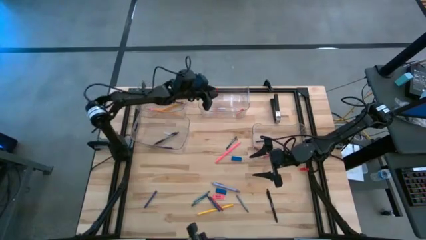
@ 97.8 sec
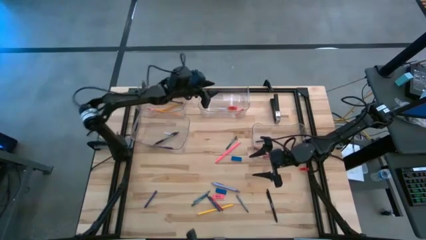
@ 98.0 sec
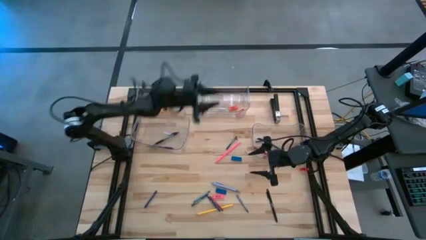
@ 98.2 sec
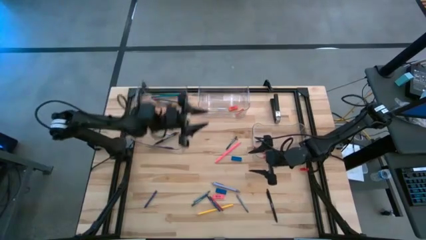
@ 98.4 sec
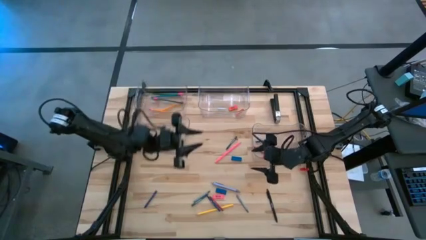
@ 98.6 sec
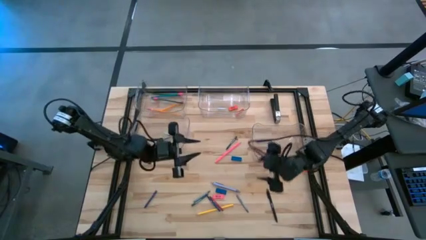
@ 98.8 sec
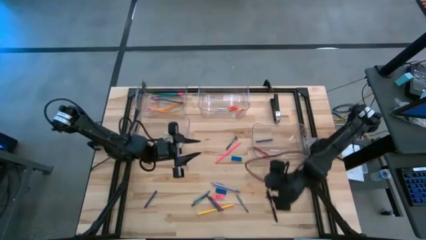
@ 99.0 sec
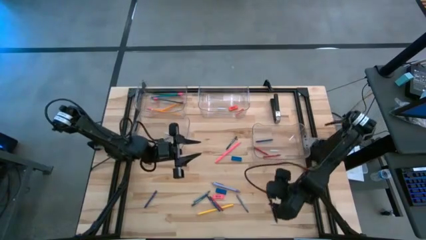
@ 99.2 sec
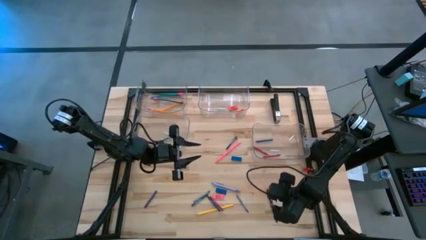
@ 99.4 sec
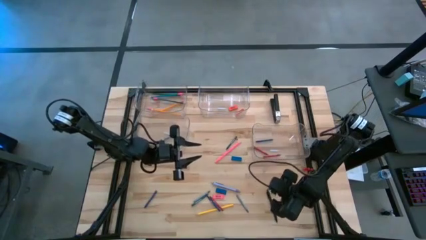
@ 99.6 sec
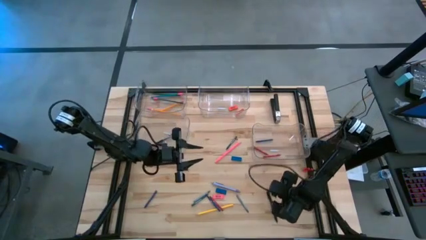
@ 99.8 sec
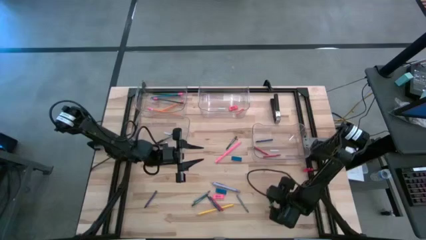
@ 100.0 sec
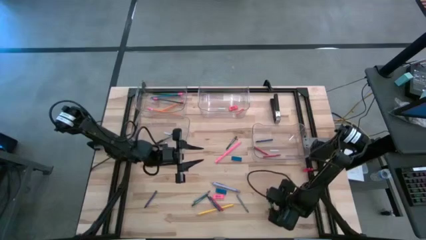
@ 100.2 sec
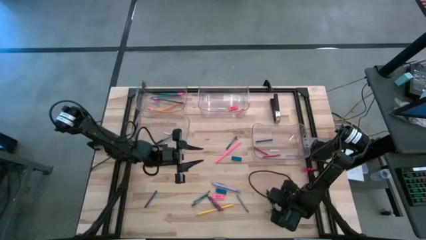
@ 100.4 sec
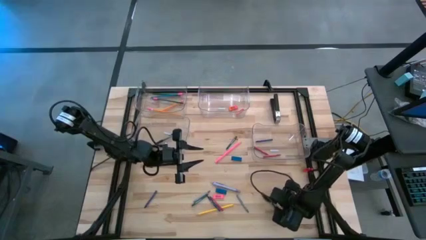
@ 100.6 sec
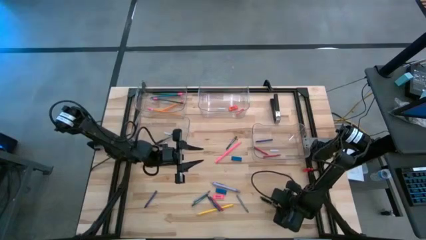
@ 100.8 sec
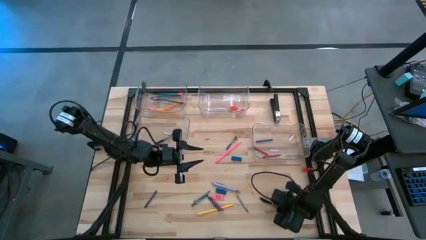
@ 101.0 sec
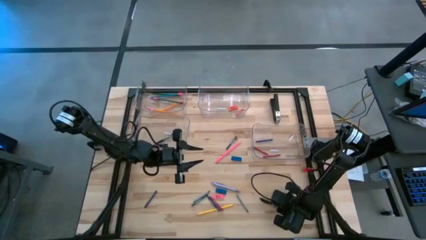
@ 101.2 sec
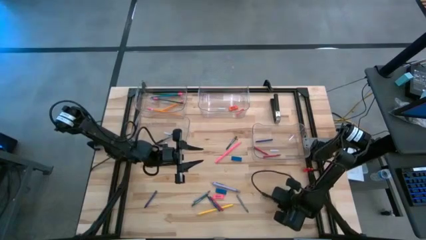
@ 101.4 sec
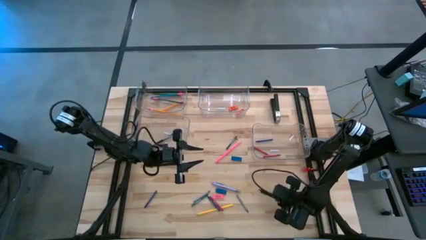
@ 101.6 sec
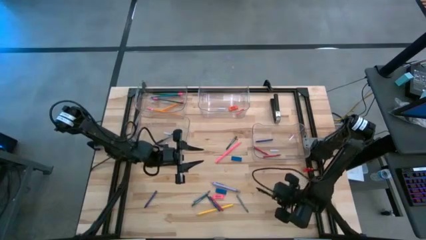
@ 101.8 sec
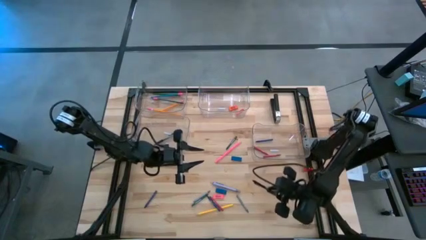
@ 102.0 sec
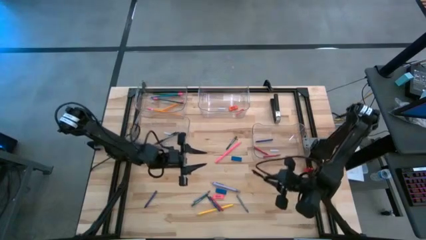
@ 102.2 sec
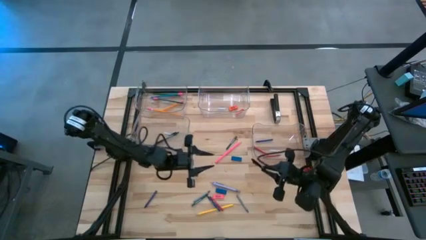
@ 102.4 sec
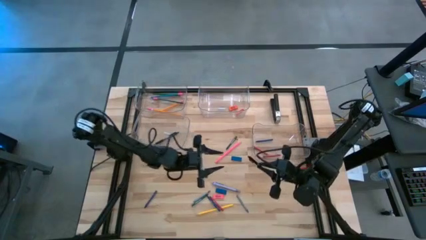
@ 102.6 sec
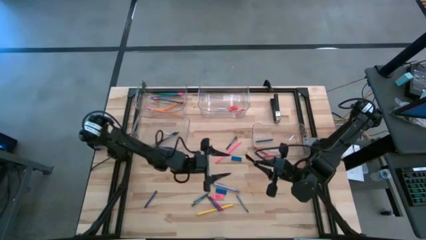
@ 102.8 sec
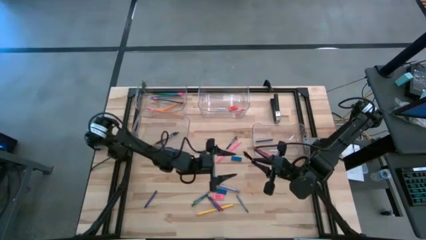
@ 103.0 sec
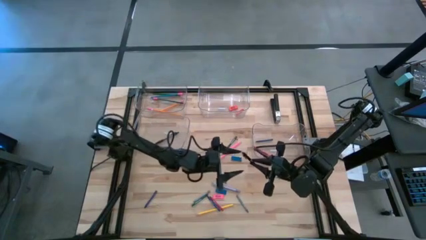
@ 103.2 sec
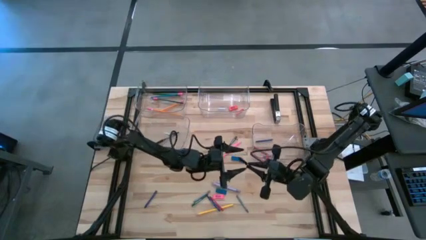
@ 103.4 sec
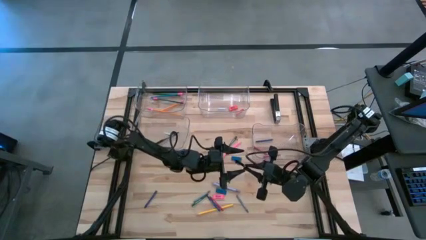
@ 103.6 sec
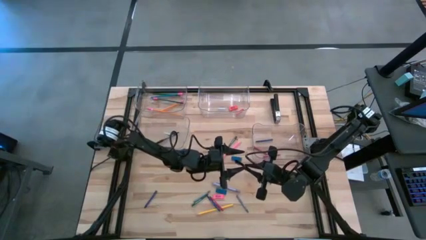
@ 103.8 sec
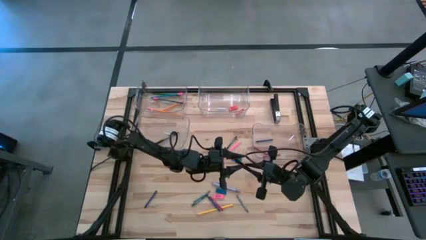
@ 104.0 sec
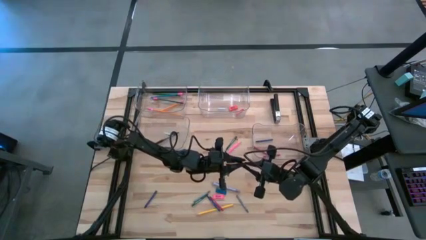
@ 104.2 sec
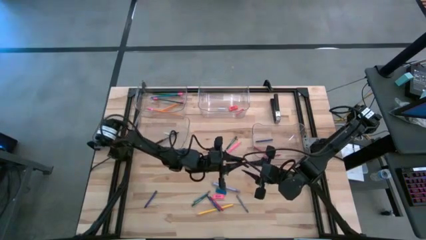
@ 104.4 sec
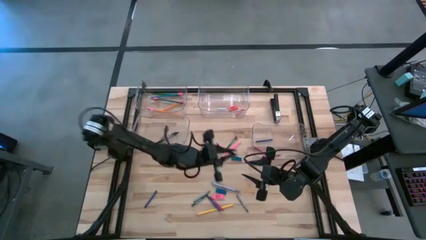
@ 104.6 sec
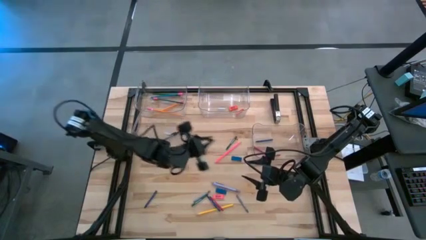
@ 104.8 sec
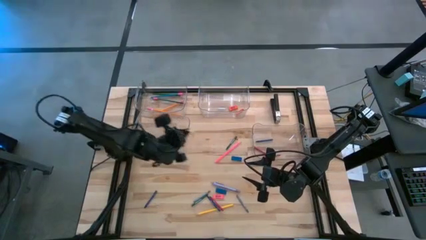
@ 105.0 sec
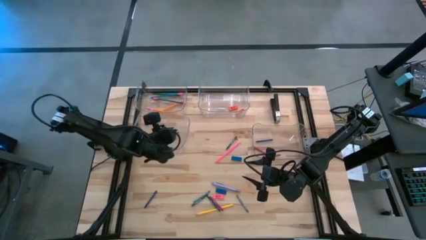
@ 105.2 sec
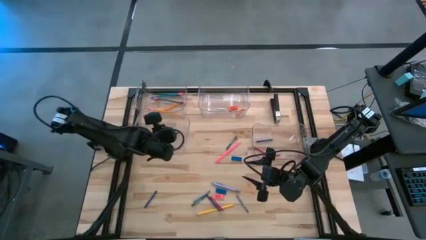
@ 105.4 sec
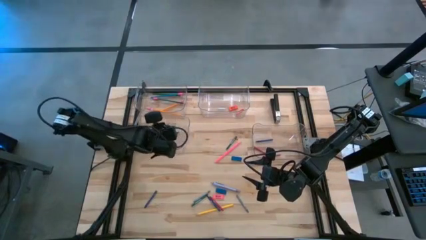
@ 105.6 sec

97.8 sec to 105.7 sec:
Task: Sort crayons/erasers/pens/pencils in bins
Put the black pen into the bottom left transparent bin

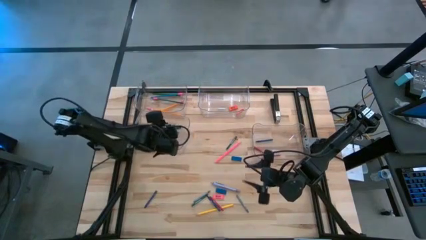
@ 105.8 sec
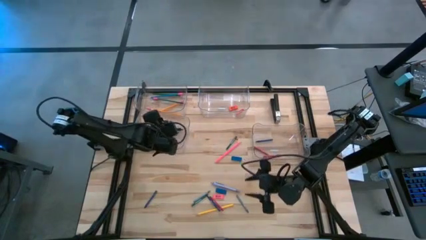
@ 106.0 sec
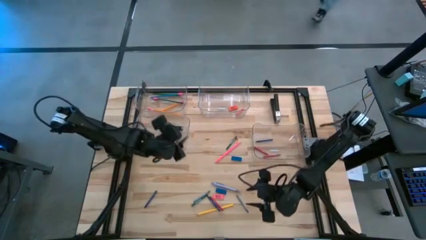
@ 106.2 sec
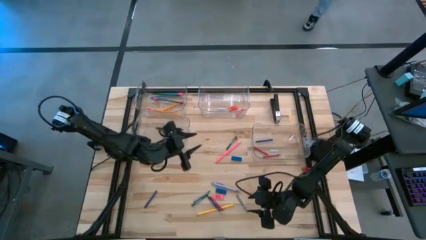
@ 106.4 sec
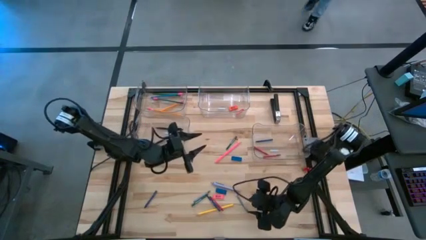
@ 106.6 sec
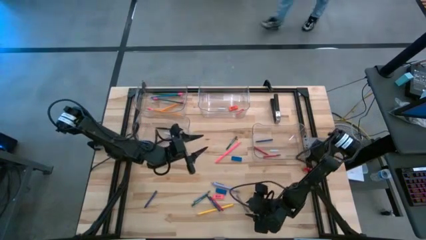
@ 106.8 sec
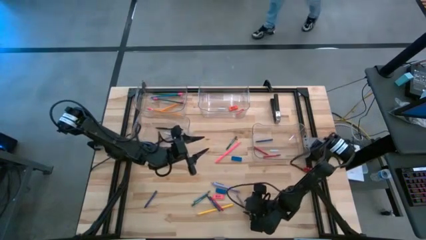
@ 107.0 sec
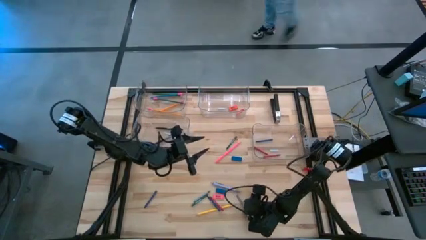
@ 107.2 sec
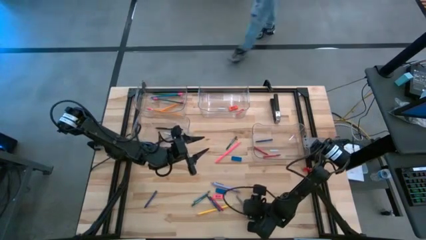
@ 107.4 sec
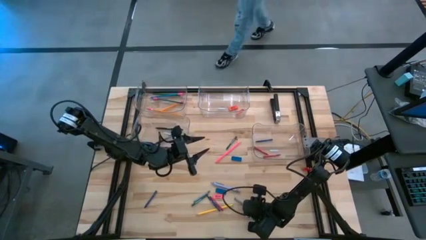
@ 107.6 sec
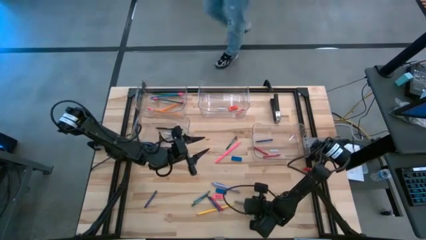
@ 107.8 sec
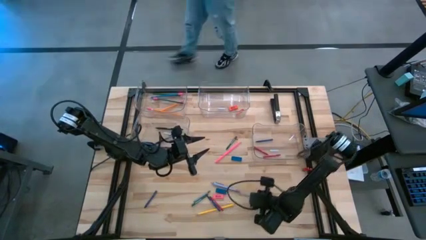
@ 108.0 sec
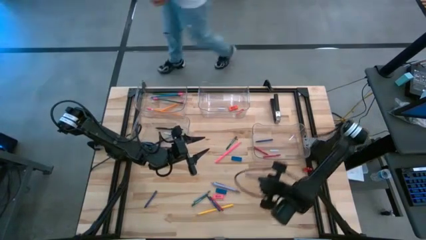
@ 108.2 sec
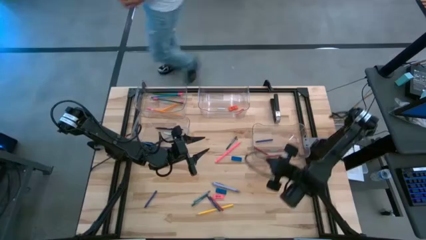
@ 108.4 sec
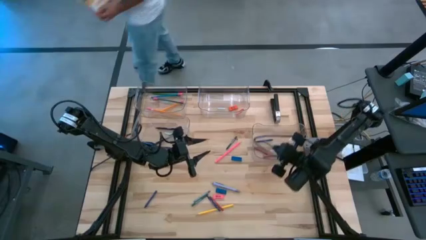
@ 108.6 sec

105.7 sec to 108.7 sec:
Put the gray crayon into the bottom right transparent bin

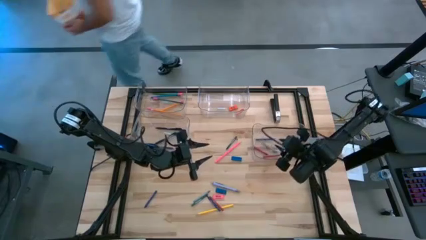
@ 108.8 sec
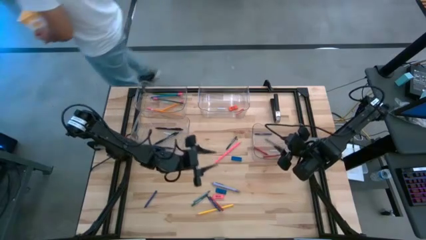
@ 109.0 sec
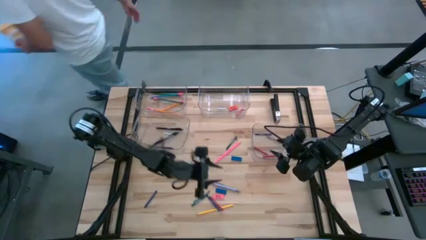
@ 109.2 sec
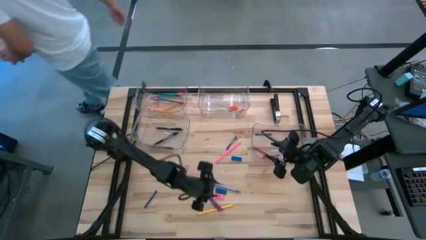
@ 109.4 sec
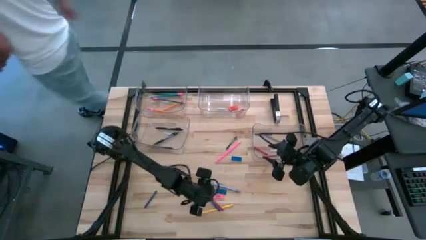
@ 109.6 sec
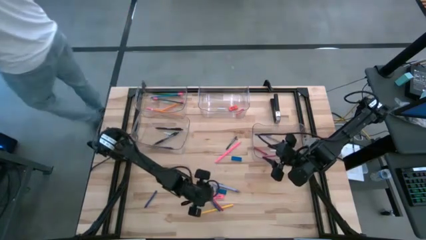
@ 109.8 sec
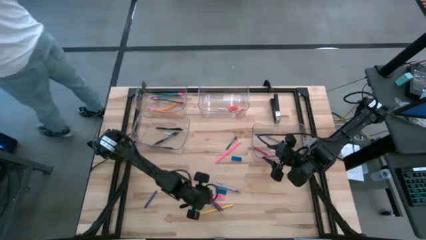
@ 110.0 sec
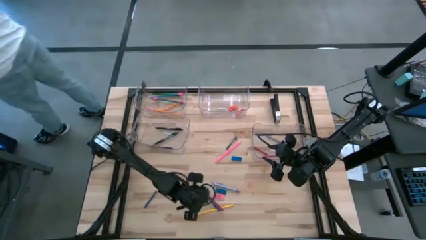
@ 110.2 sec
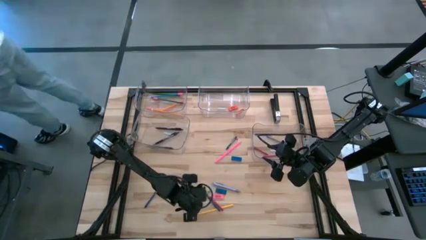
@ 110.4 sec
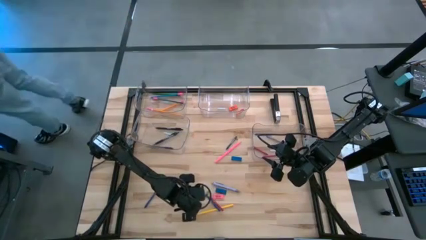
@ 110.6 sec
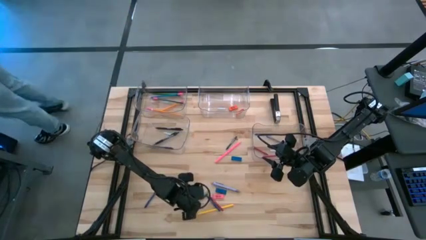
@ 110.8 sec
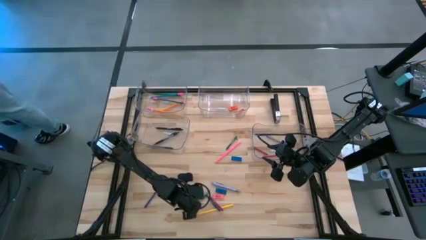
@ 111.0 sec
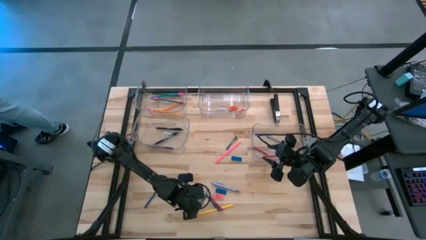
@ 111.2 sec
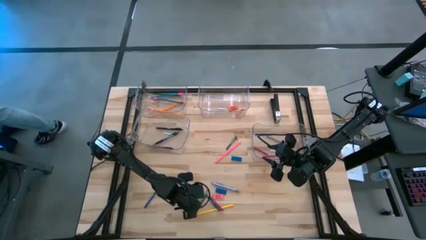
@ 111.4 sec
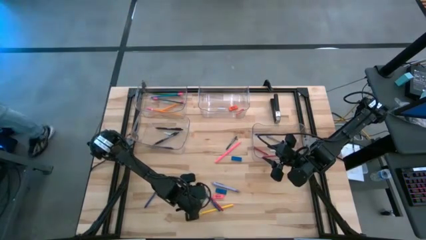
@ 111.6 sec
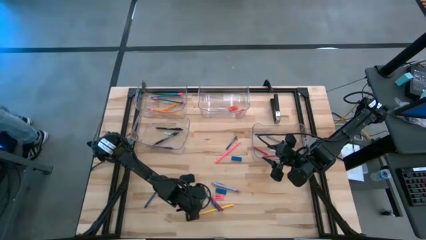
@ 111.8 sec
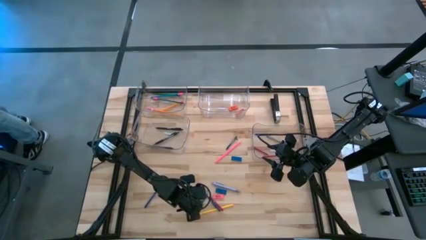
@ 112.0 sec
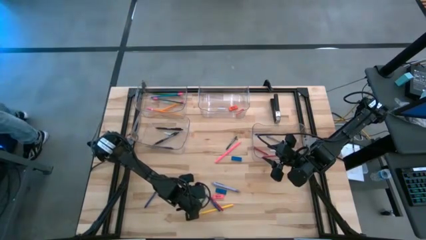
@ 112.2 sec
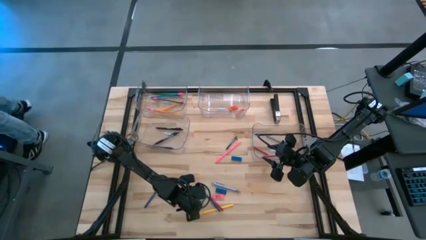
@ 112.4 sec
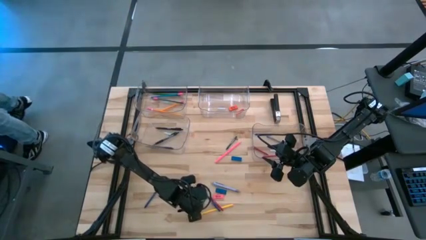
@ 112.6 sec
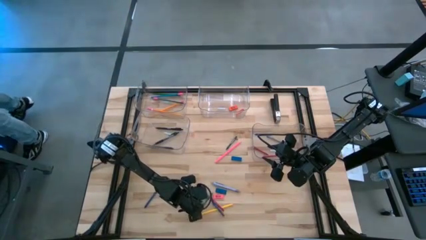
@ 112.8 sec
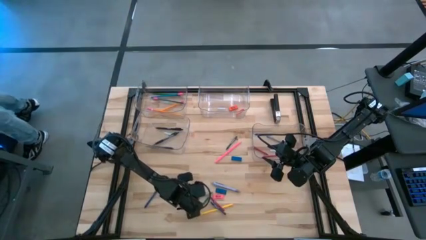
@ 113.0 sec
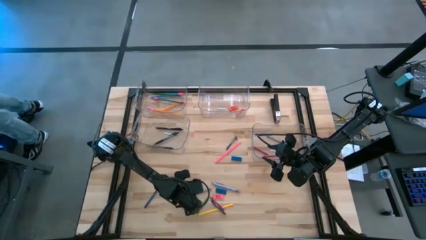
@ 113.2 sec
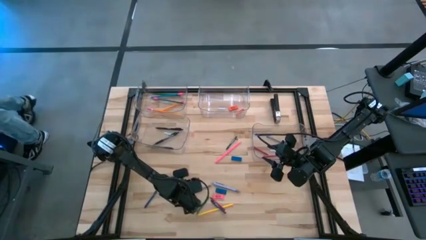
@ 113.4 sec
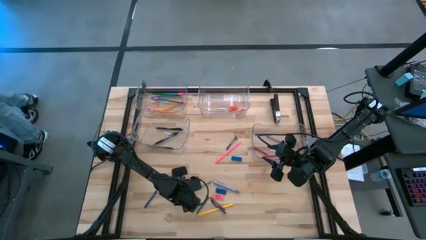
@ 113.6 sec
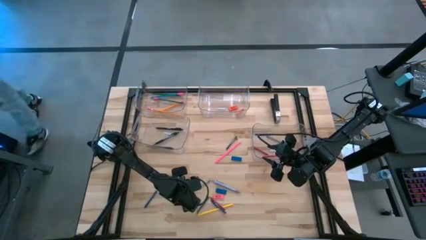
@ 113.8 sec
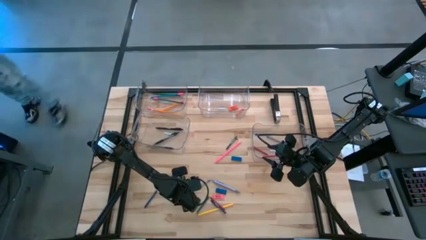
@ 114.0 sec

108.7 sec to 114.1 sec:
Put the gray crayon into the bottom right transparent bin
